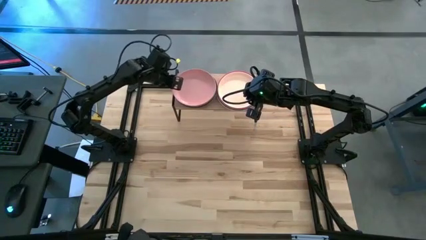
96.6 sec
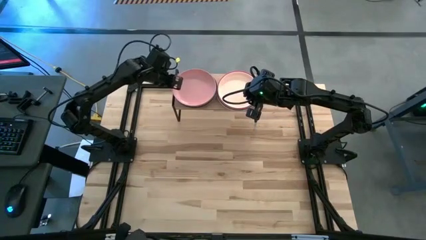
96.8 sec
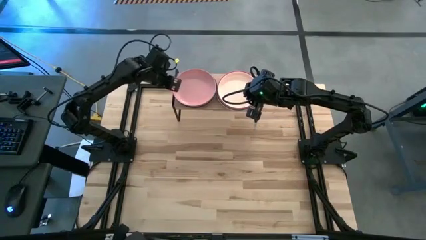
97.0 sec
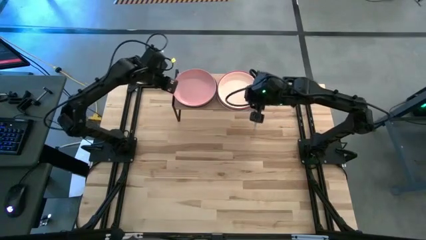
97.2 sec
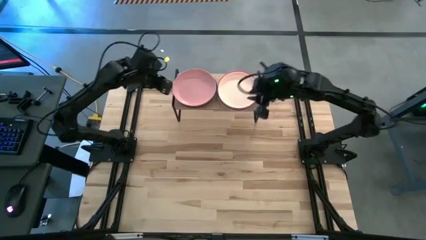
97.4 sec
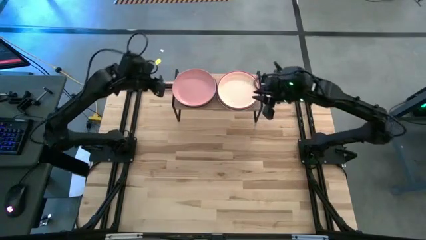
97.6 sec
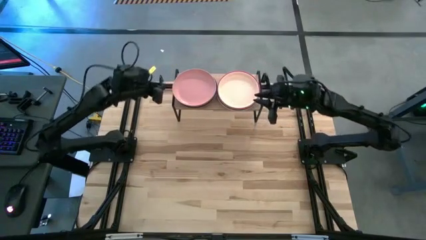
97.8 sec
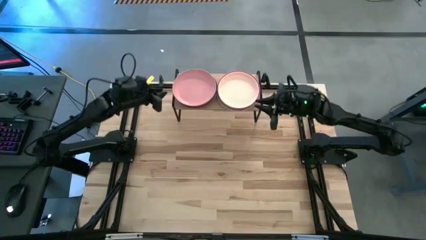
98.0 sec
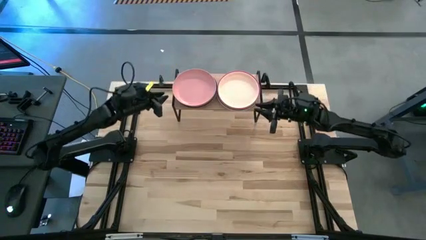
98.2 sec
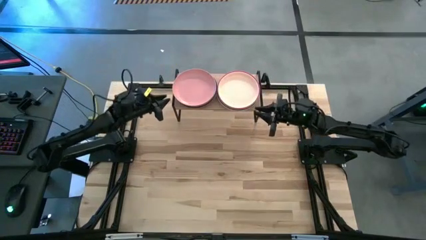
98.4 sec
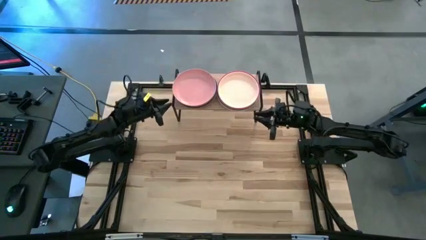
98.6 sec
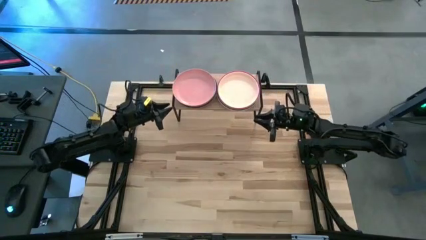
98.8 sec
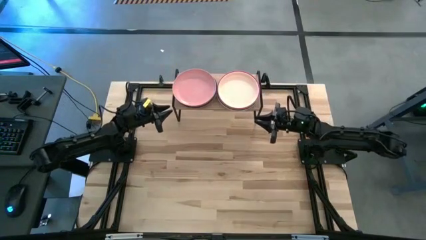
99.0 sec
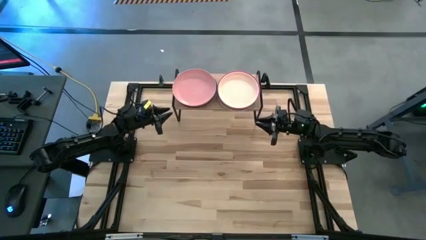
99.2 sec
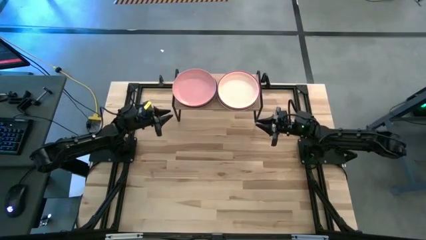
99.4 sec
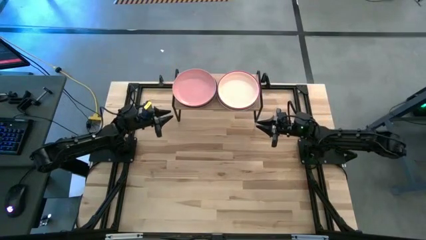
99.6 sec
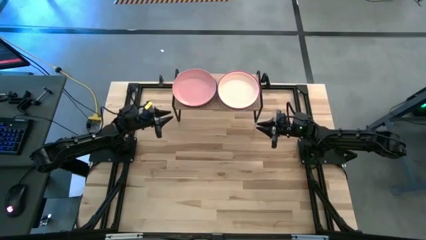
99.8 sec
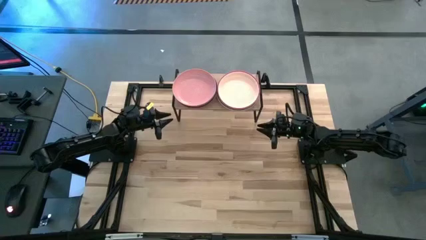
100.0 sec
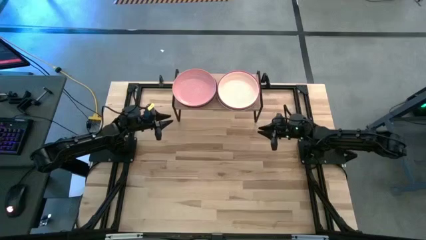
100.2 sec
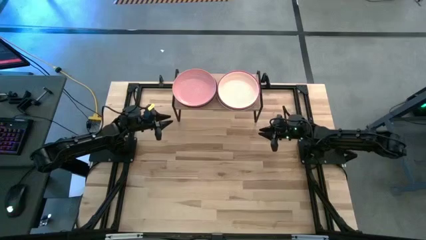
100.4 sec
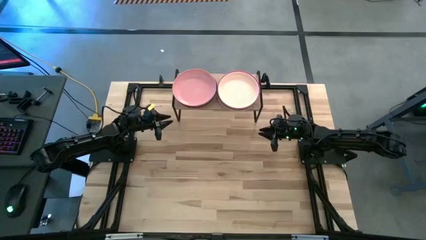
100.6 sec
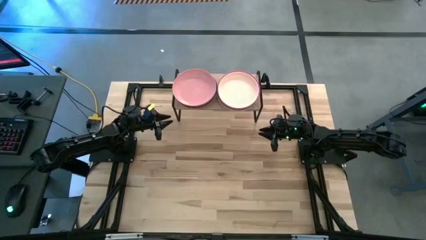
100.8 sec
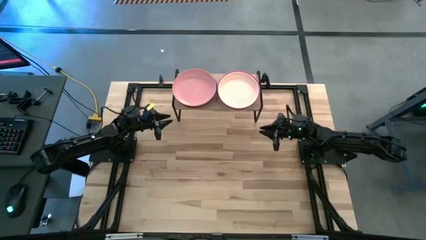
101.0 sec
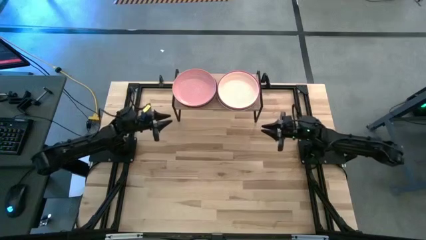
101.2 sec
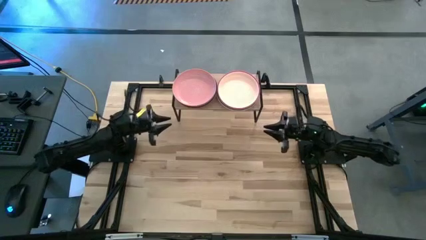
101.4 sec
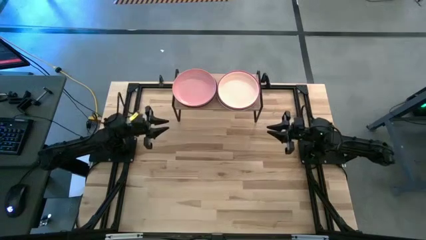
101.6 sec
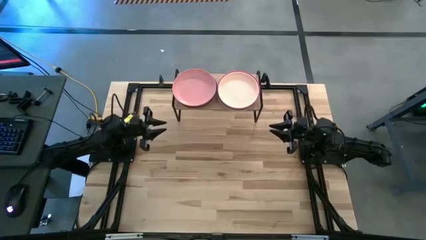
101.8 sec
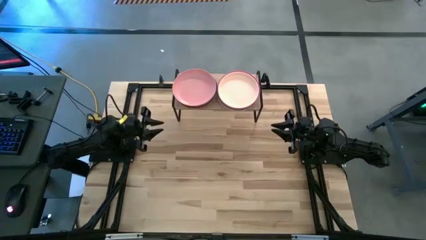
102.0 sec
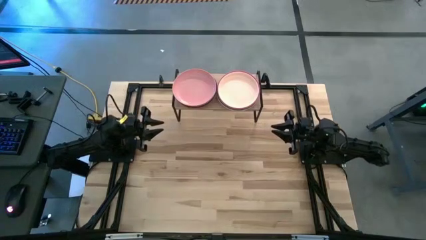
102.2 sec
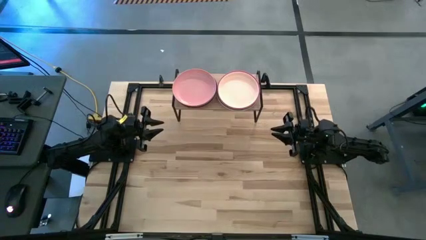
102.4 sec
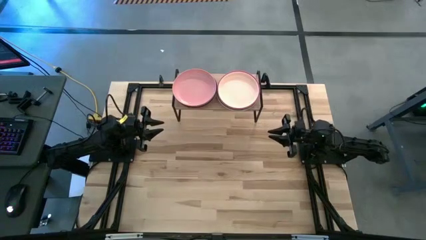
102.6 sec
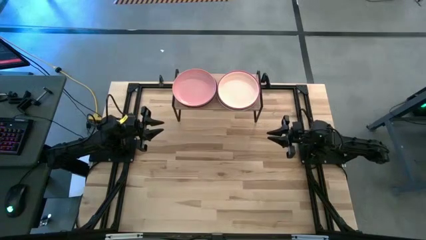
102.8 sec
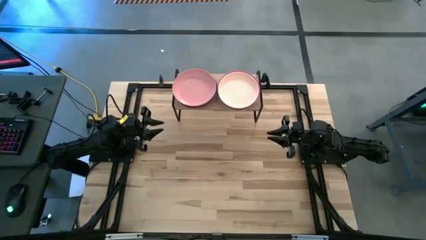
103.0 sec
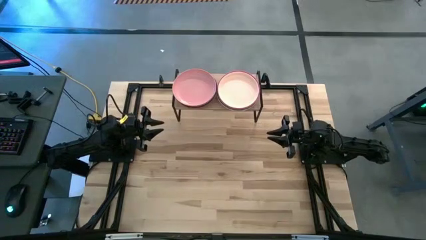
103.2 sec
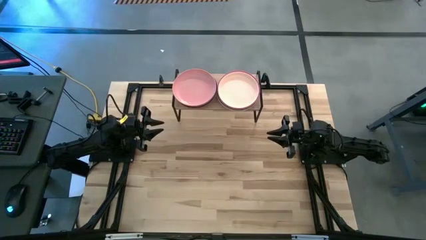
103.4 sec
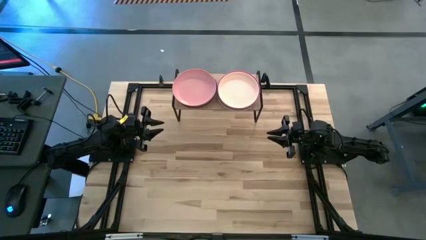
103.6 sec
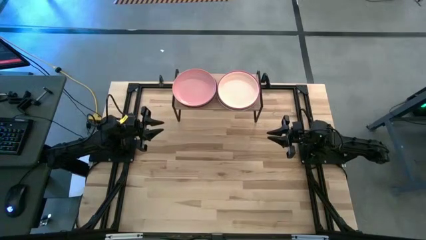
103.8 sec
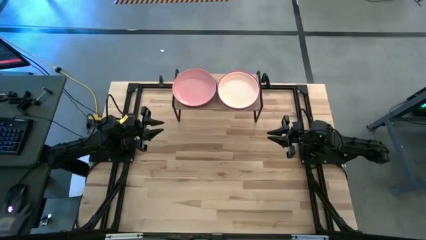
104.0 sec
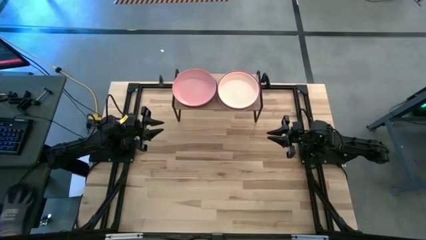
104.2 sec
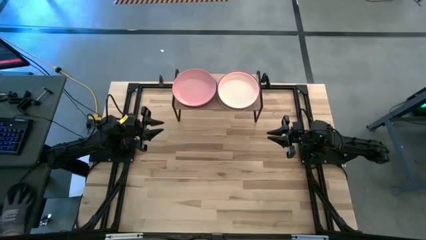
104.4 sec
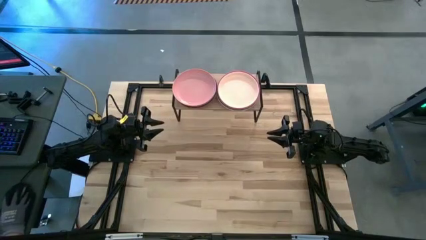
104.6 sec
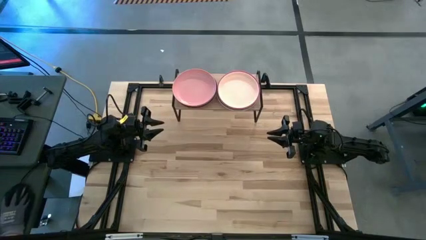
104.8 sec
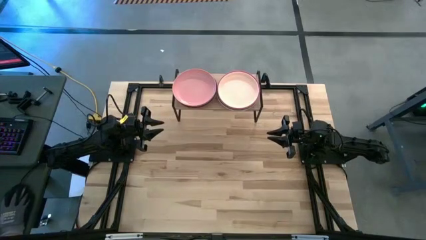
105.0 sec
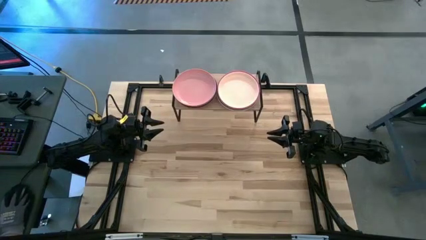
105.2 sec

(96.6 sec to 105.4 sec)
Task: Place and stack plates onto a shelf
Return to Home Position

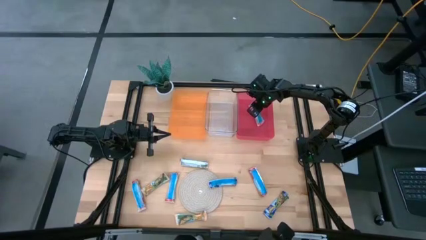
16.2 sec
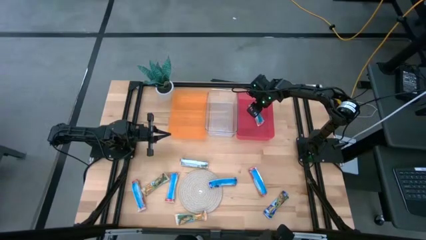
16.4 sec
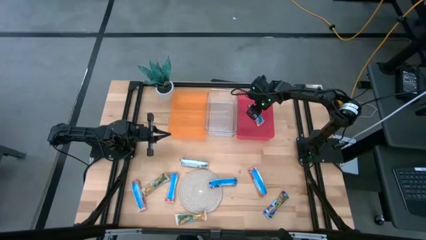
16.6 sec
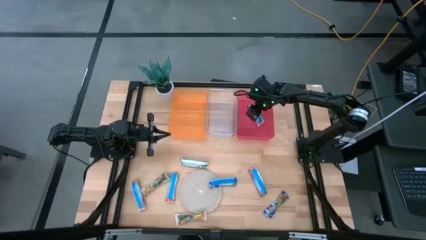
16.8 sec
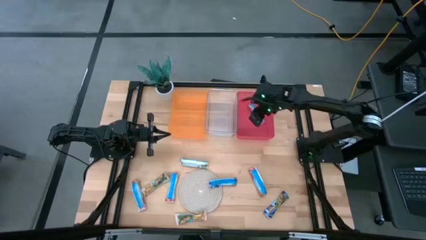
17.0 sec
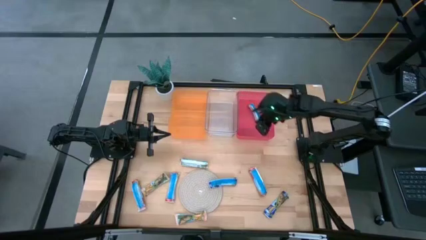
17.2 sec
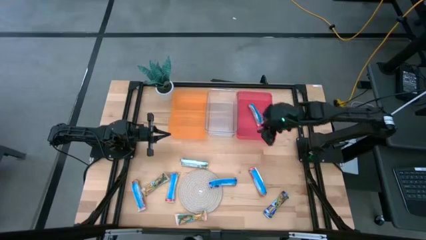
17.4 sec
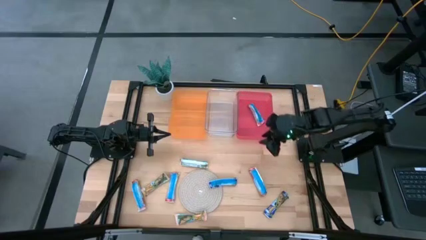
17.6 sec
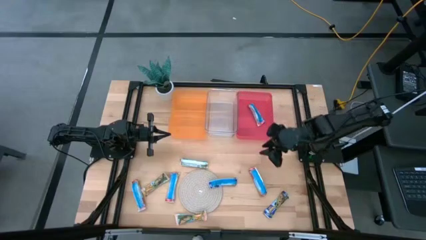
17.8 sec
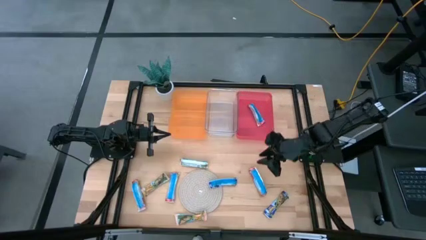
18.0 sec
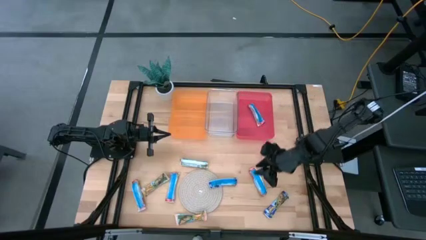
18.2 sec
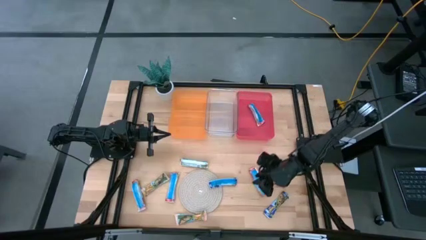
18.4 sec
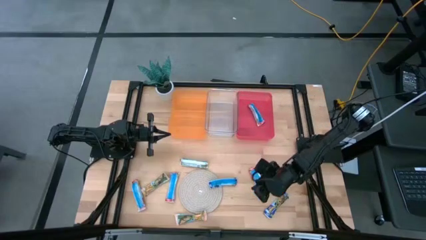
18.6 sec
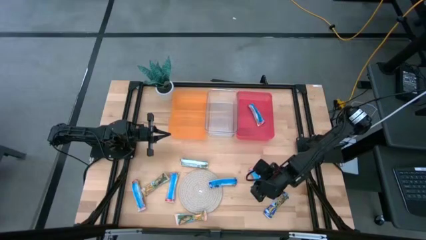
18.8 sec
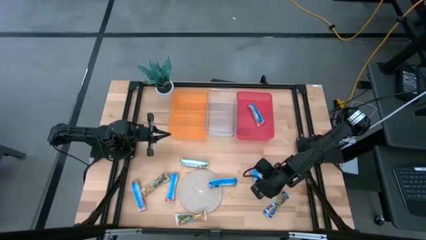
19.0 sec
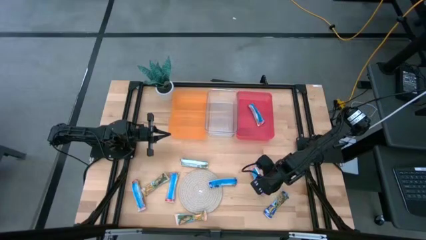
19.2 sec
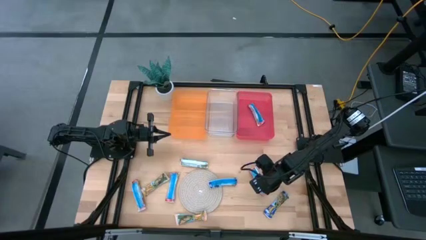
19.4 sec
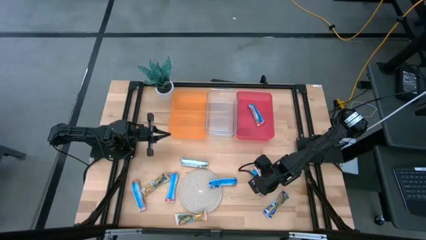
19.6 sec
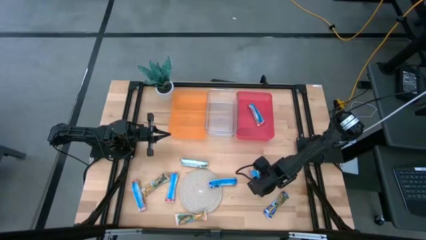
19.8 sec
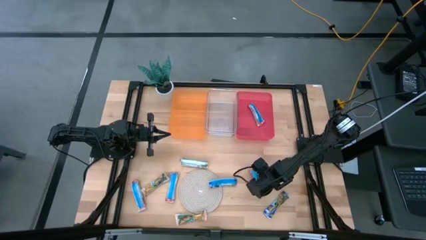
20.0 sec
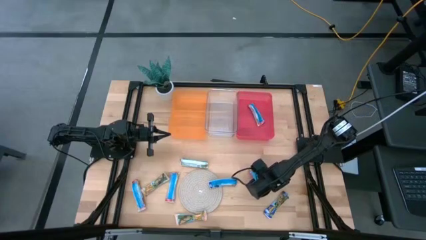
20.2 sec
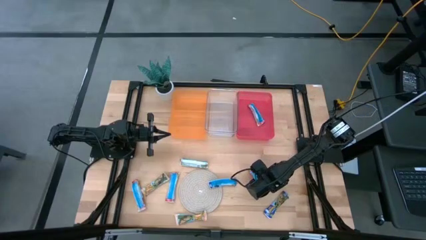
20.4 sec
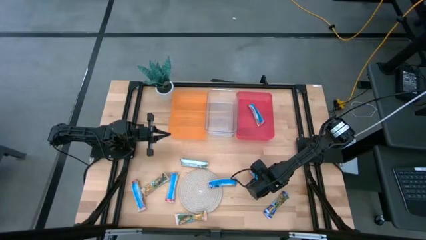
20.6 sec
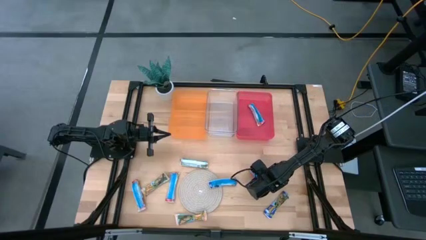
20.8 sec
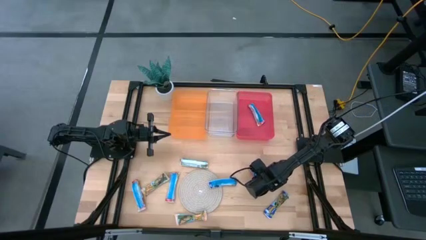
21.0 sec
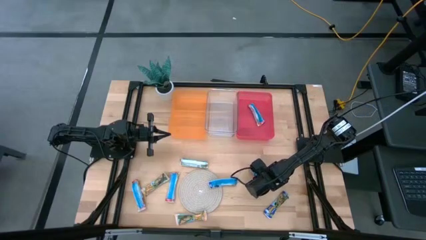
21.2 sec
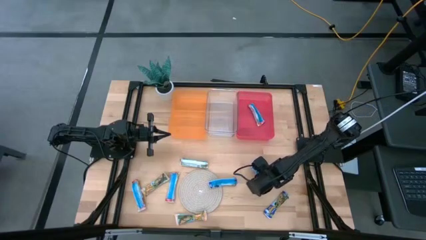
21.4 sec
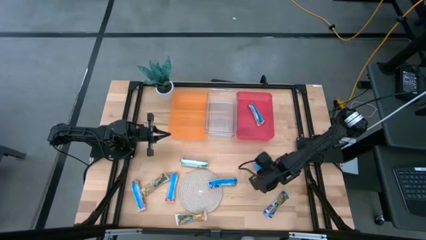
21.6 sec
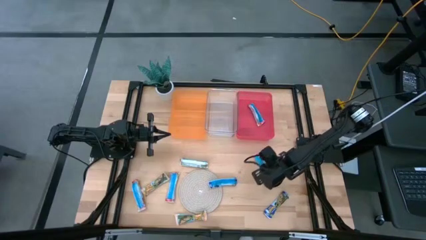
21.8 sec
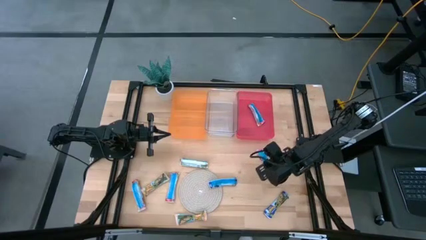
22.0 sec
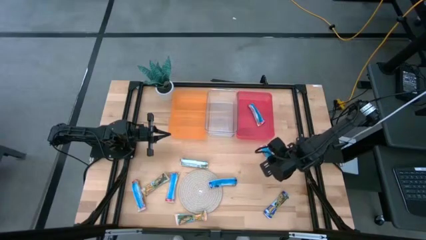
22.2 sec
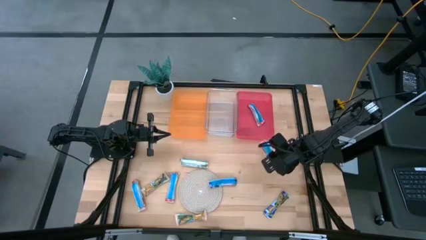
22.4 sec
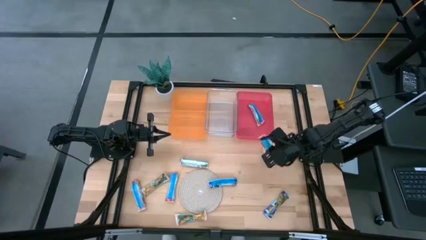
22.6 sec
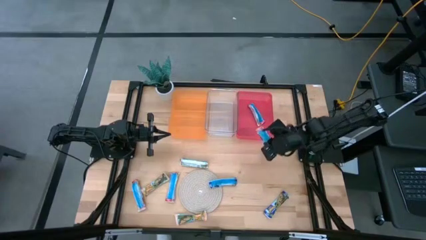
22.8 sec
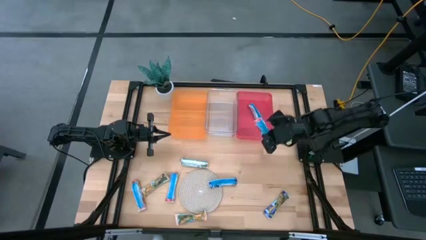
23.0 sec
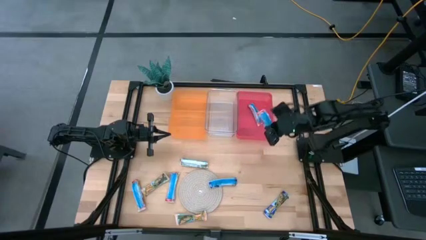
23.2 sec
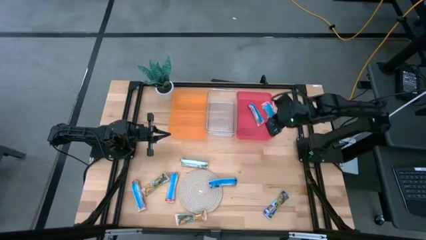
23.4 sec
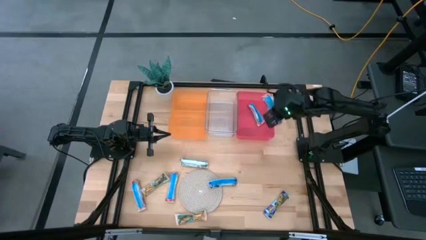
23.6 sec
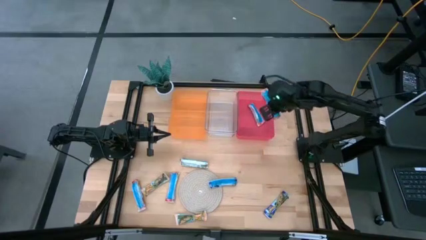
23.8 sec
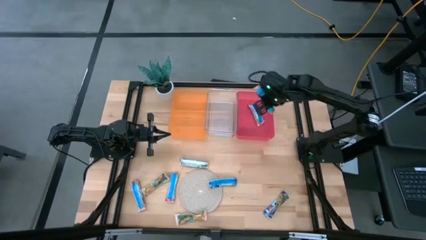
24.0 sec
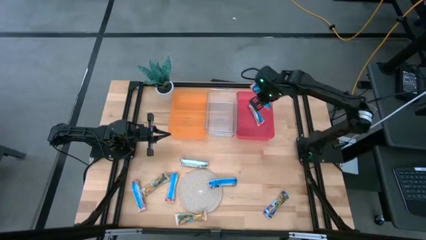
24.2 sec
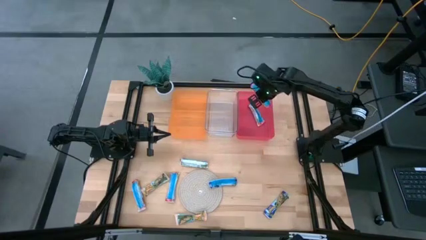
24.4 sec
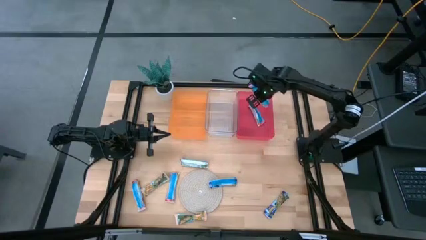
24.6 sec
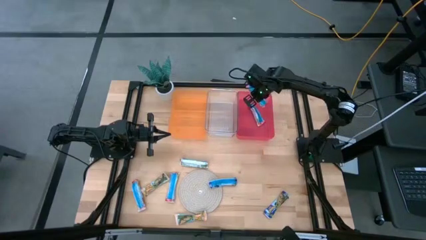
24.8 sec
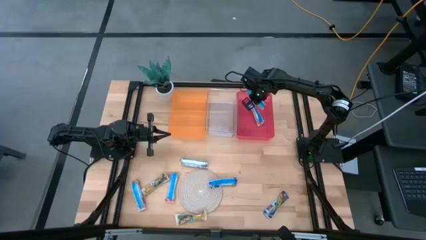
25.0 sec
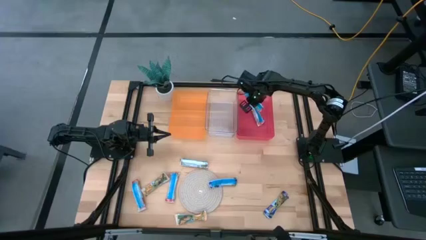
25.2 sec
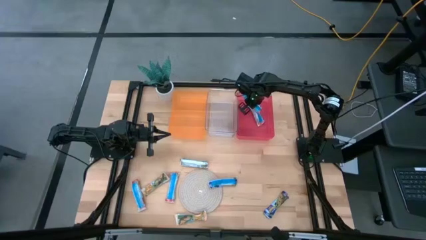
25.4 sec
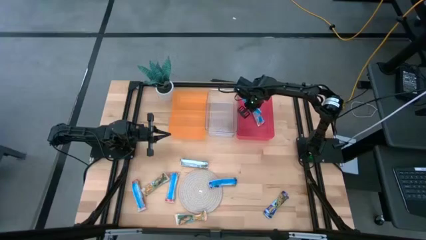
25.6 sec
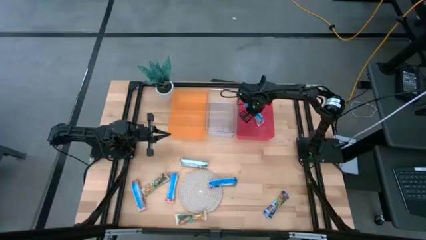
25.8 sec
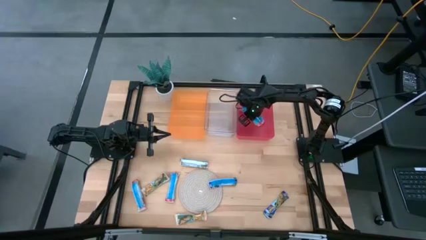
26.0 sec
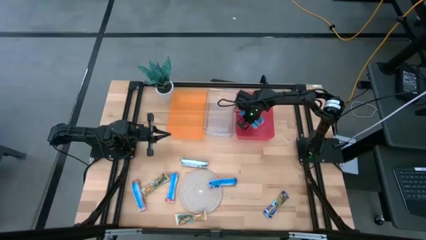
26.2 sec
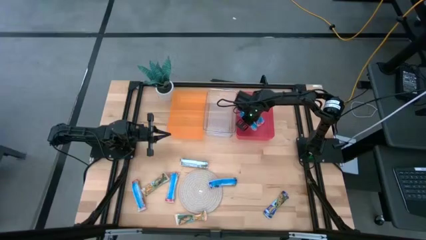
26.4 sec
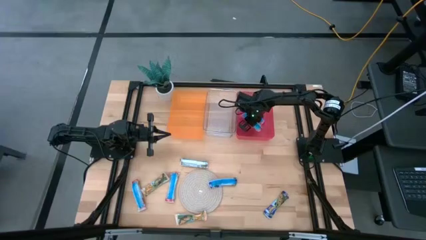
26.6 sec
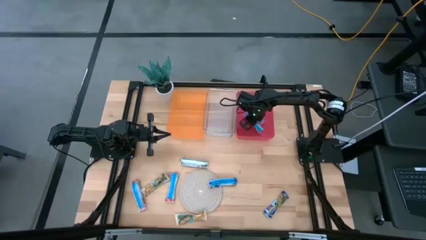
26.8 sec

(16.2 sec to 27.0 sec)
Task: Pick and place Granola Bars by type
Put the right red granola bar into the pink bin
